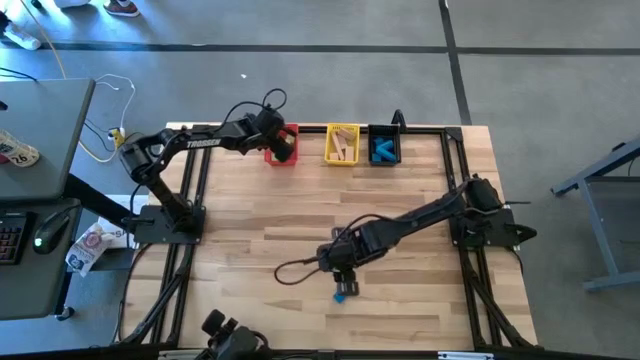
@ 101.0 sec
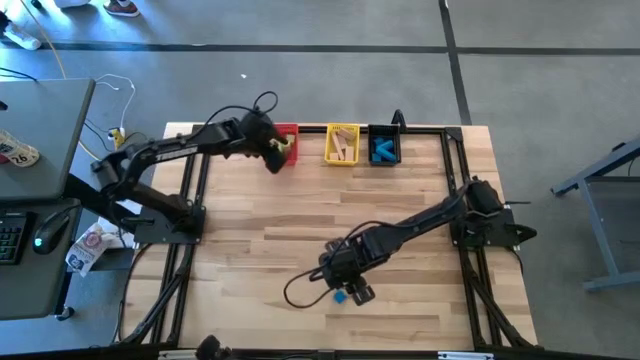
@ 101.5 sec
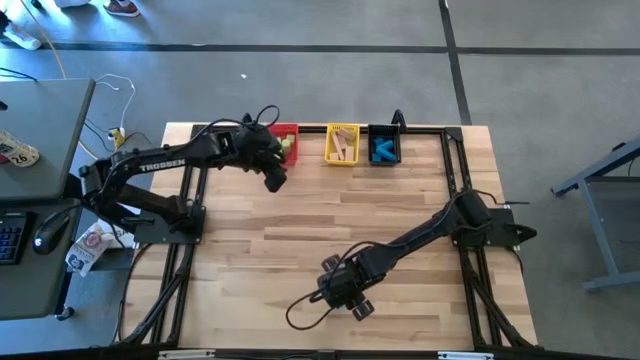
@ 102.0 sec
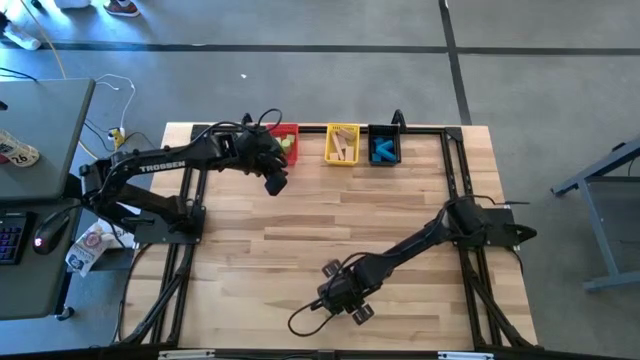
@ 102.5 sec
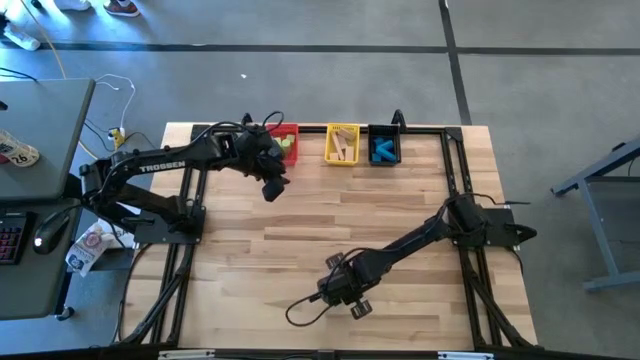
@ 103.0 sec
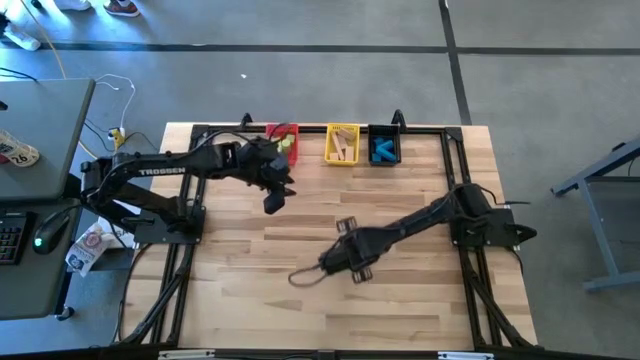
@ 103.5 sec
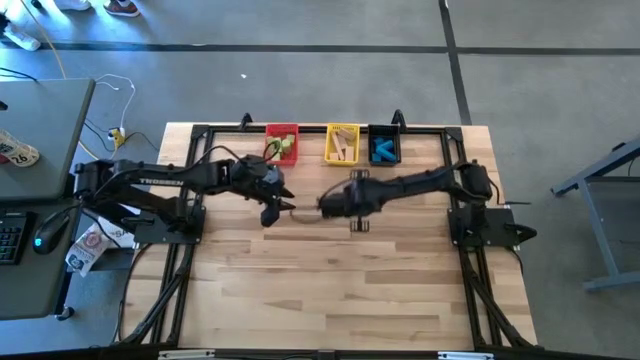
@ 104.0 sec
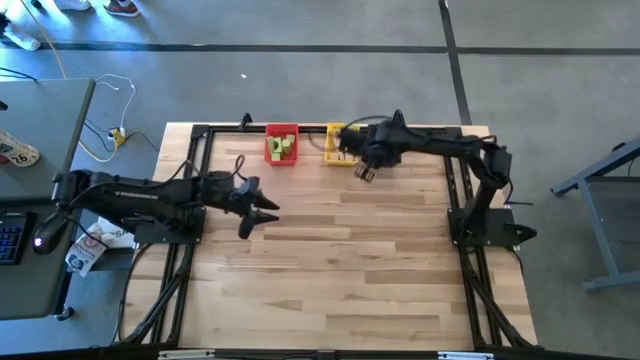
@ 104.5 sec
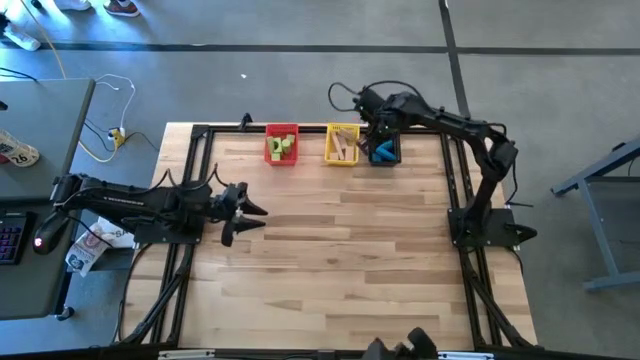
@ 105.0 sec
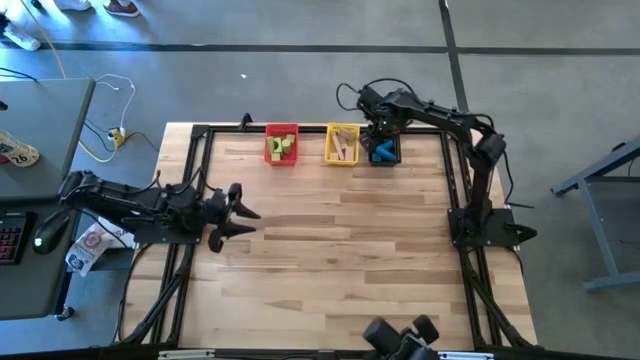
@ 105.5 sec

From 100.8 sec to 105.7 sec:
Task: Sort & place blocks by color
Put the blue block into the black bin

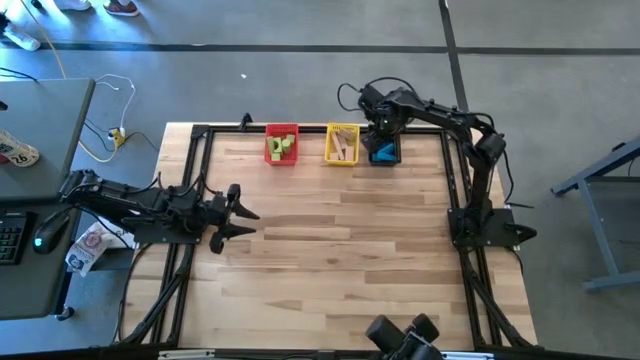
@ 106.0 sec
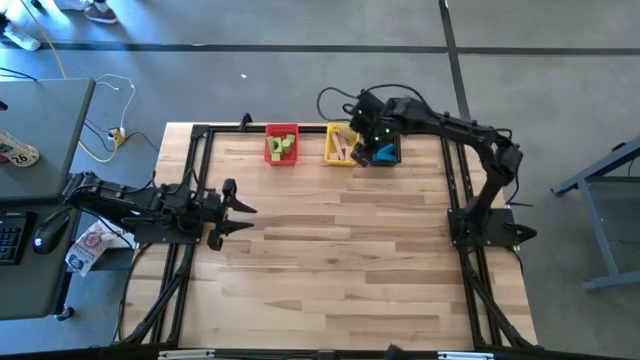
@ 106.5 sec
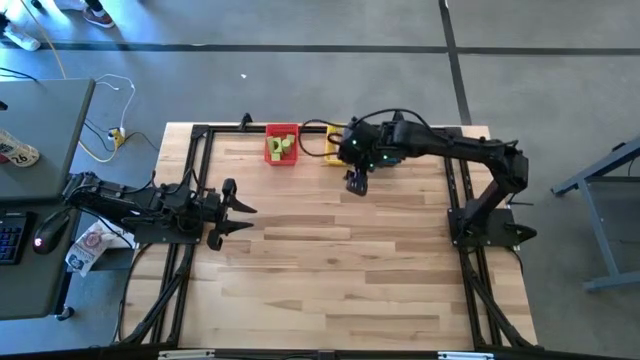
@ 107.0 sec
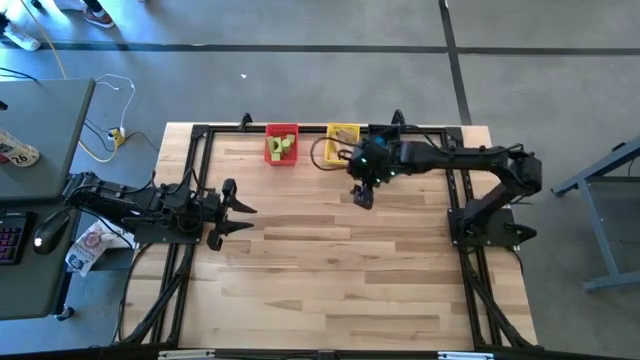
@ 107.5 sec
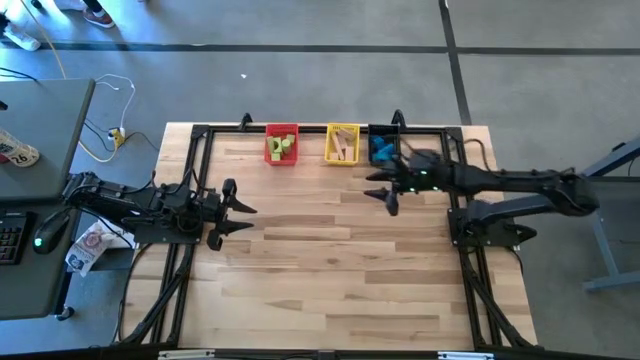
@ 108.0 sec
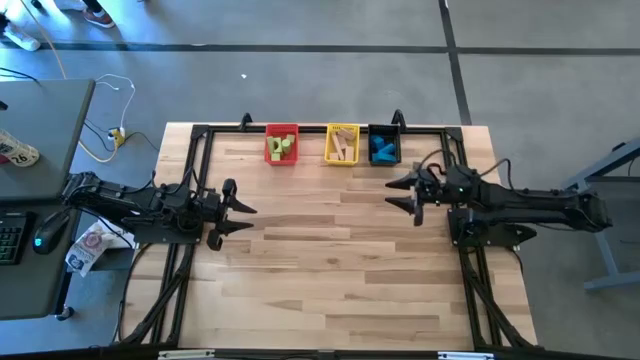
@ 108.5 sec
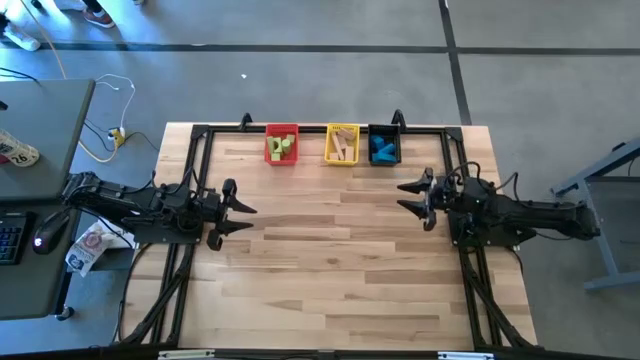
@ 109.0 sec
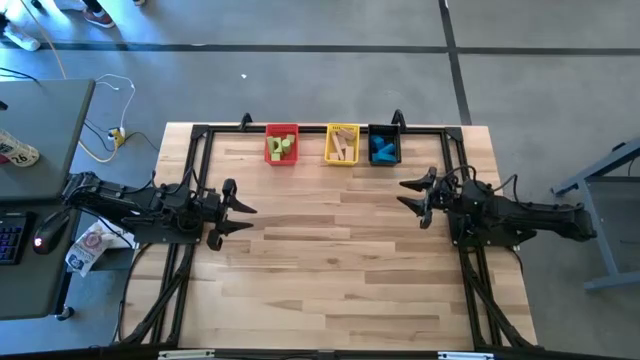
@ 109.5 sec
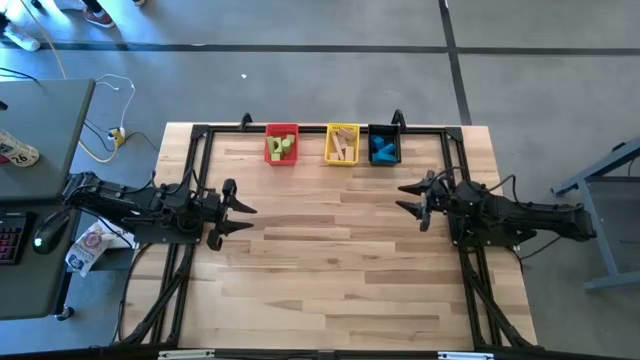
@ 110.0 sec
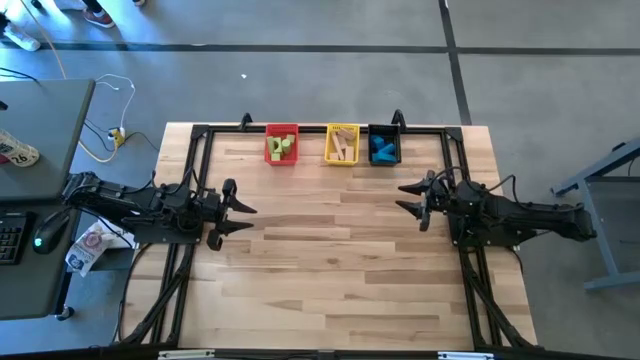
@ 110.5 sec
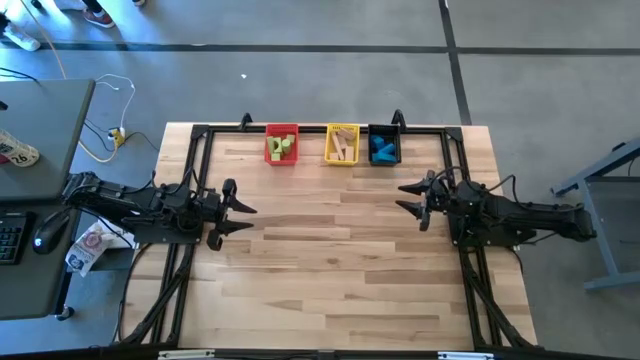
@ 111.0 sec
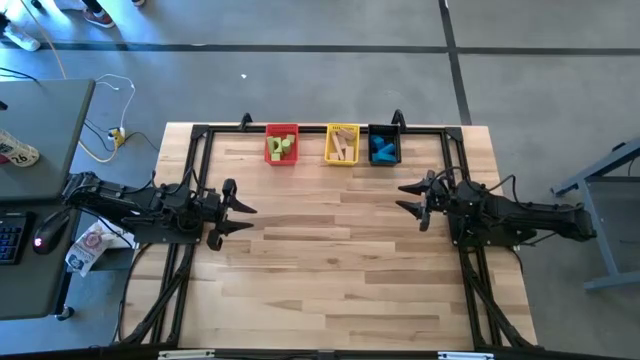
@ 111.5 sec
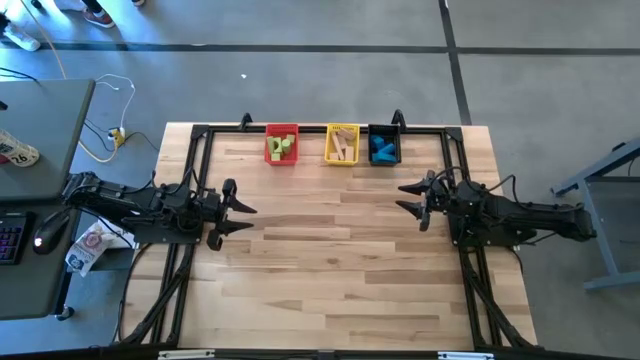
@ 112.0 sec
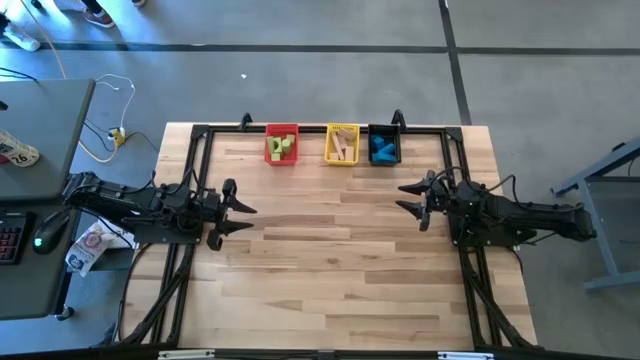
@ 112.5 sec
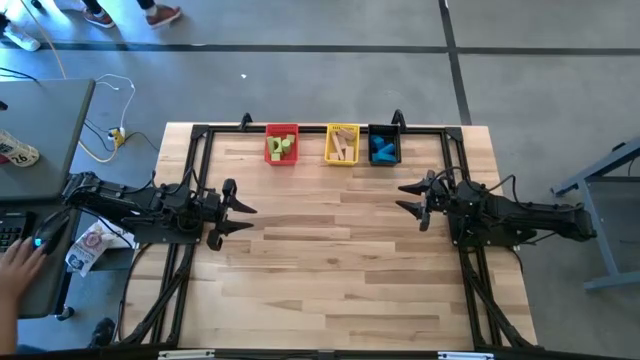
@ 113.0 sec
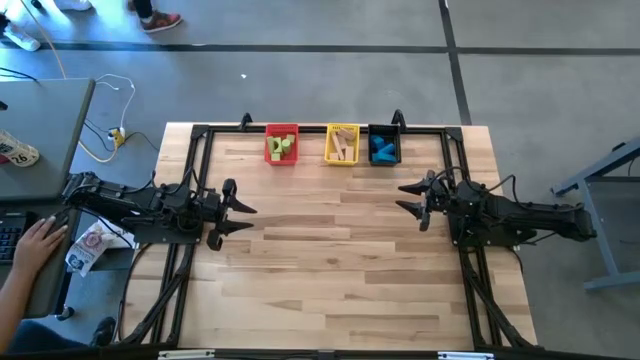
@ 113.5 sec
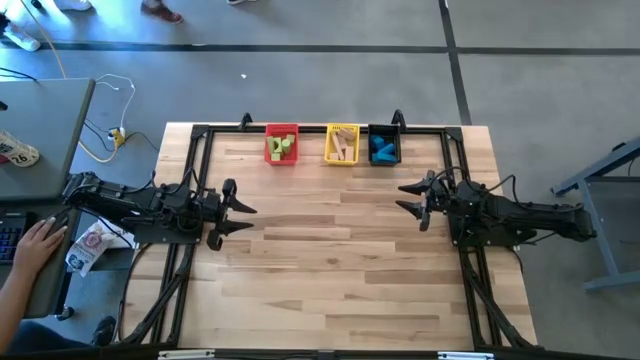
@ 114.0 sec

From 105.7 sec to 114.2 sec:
Return to home position

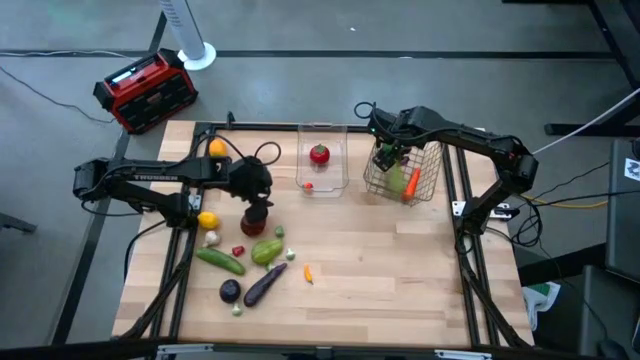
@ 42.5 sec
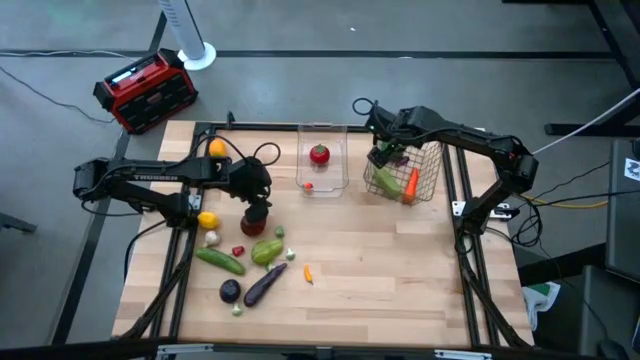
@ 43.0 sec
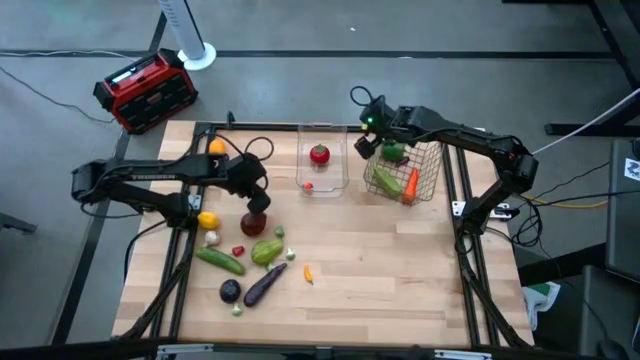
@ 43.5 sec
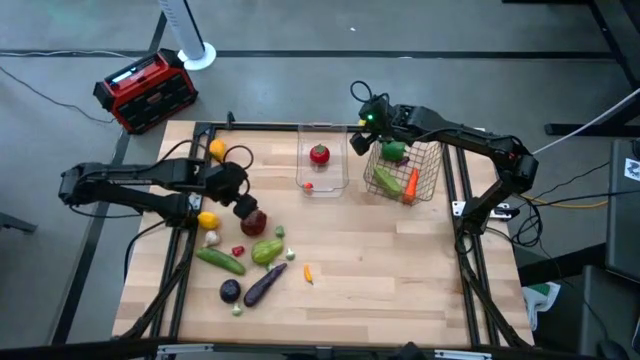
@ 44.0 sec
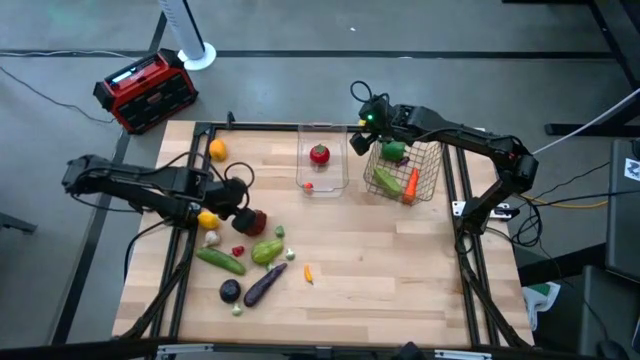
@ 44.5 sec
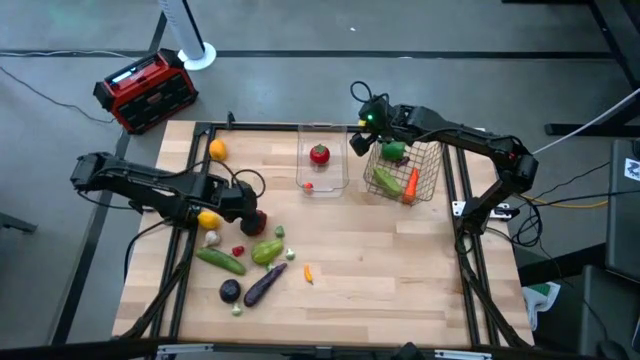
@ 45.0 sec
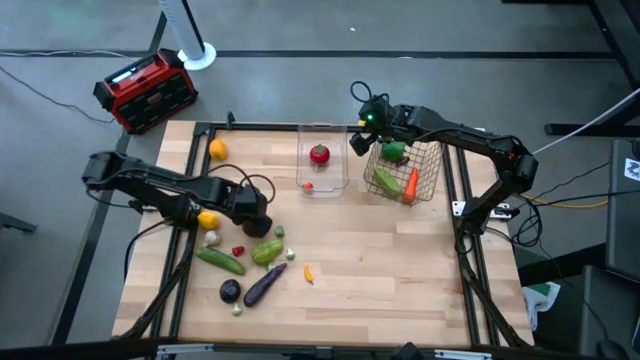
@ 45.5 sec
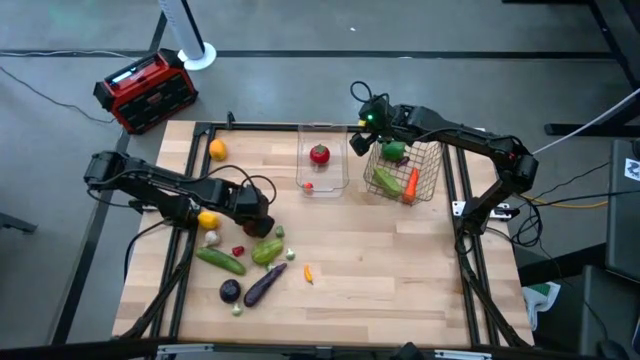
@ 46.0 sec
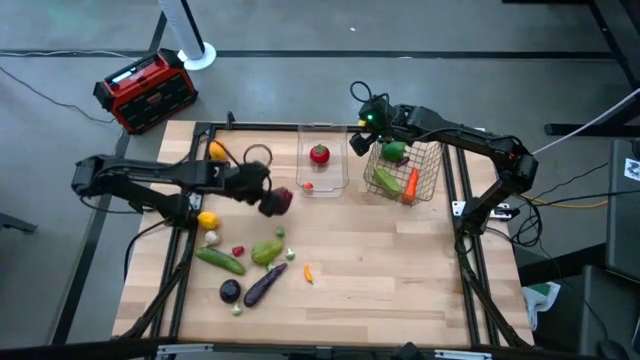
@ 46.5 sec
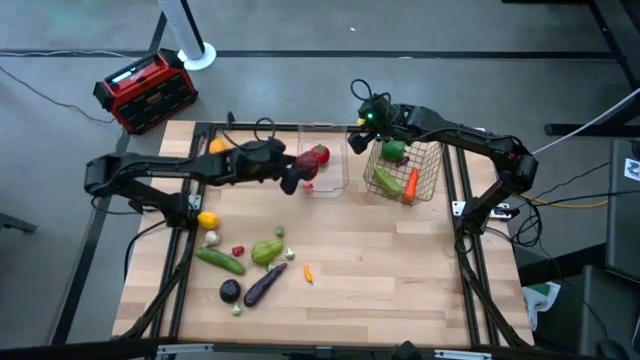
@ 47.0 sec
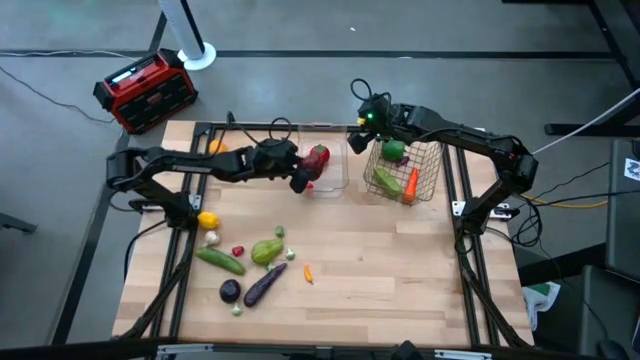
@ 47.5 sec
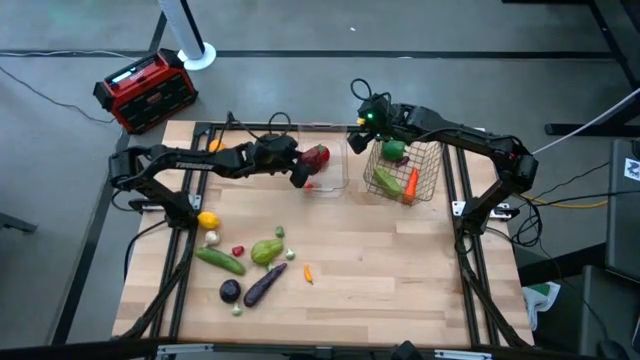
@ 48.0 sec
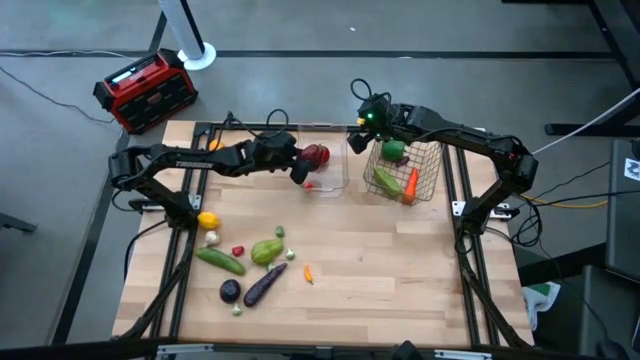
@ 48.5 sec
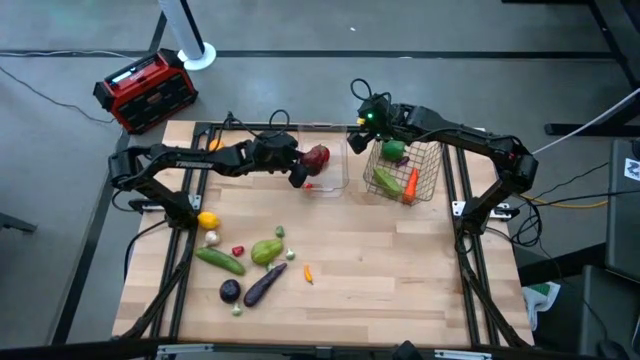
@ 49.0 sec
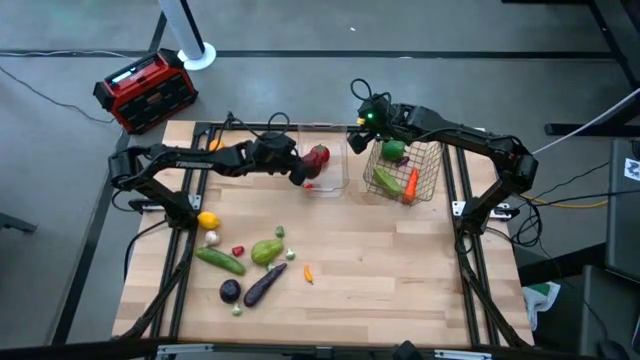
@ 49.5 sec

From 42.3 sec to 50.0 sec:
Task: Sort produce into baskets
Put the red apple into the transparent bin
